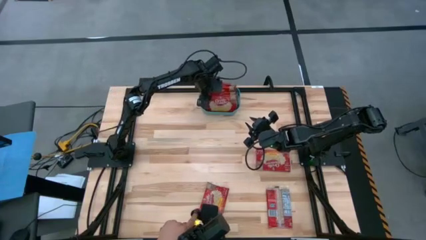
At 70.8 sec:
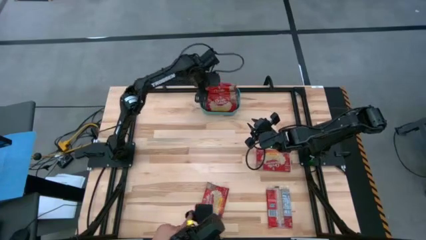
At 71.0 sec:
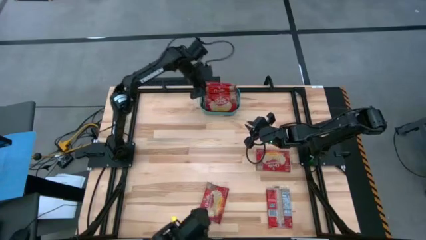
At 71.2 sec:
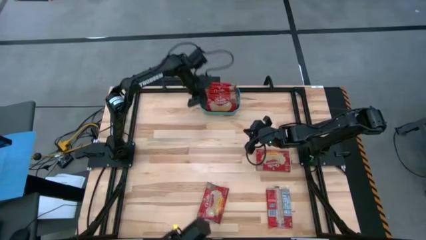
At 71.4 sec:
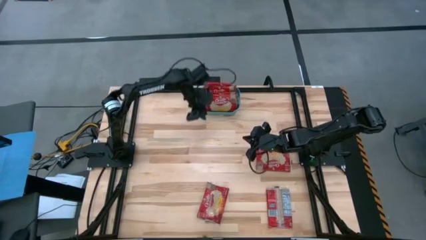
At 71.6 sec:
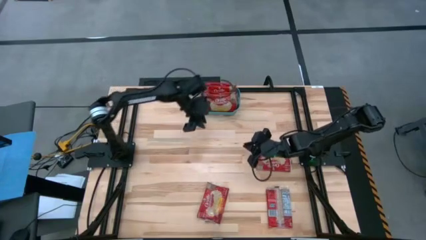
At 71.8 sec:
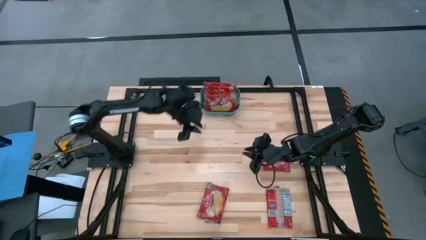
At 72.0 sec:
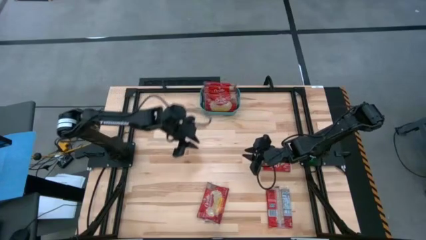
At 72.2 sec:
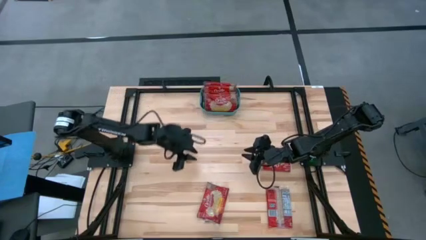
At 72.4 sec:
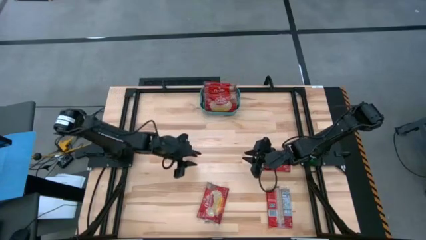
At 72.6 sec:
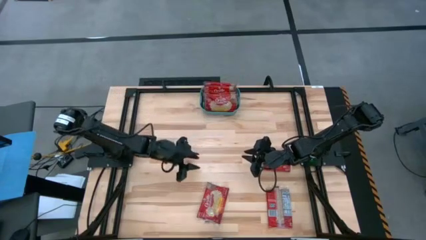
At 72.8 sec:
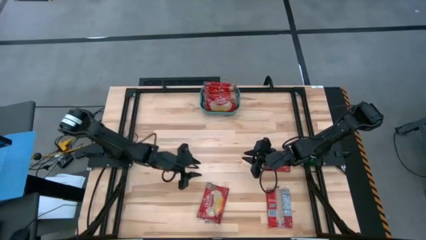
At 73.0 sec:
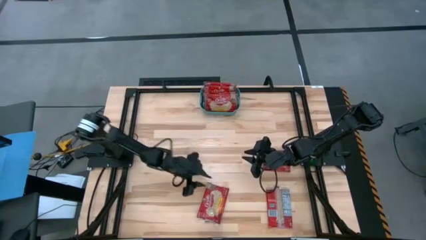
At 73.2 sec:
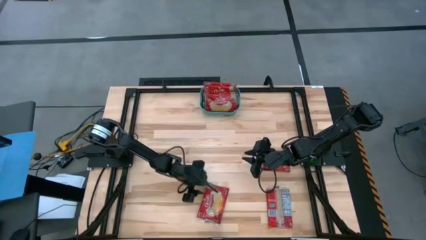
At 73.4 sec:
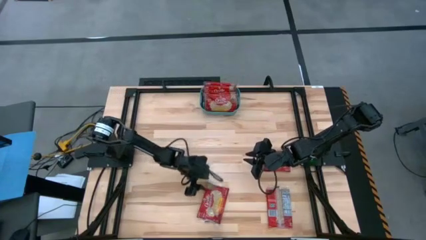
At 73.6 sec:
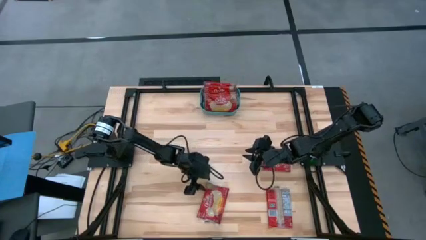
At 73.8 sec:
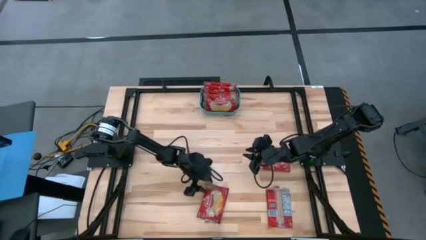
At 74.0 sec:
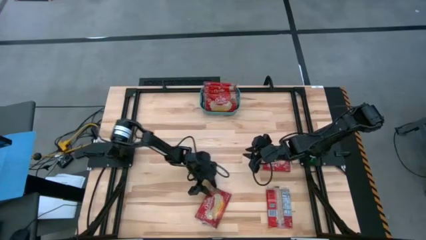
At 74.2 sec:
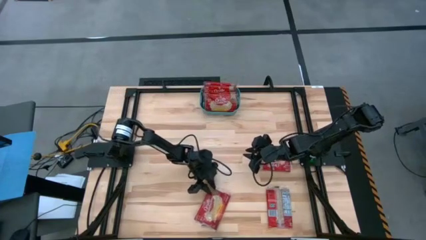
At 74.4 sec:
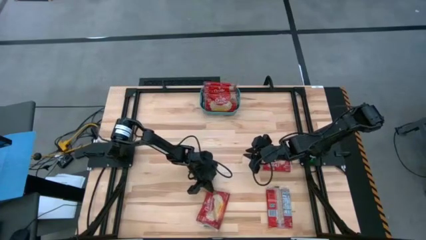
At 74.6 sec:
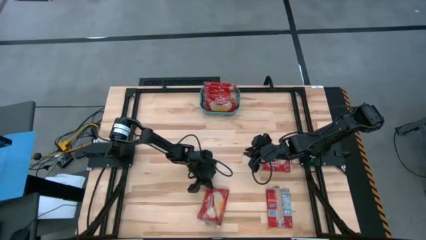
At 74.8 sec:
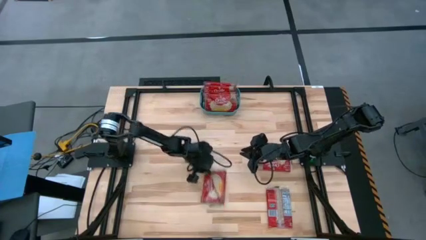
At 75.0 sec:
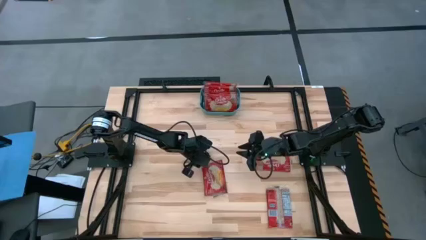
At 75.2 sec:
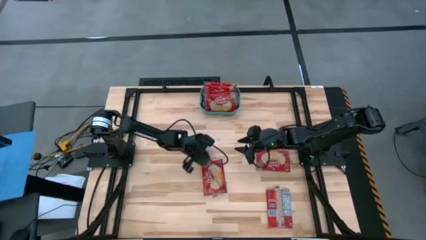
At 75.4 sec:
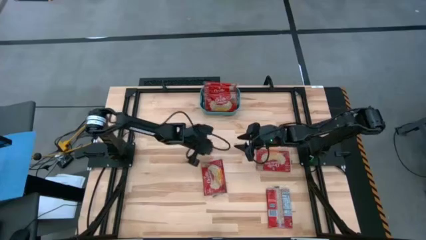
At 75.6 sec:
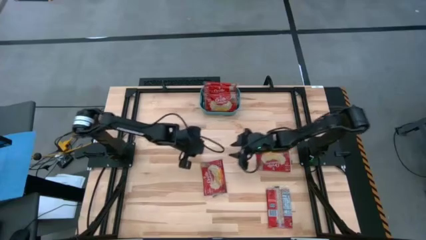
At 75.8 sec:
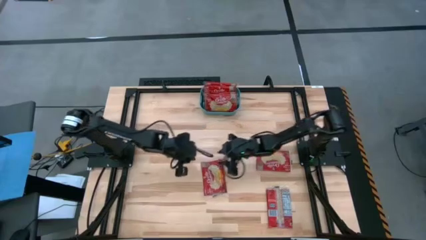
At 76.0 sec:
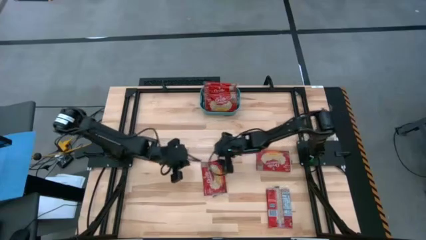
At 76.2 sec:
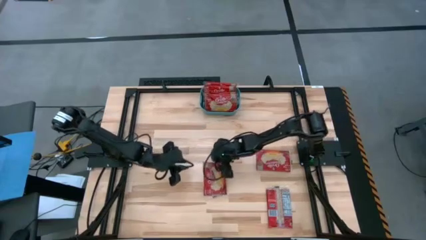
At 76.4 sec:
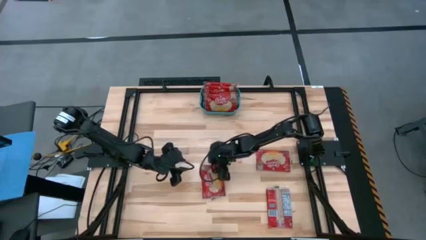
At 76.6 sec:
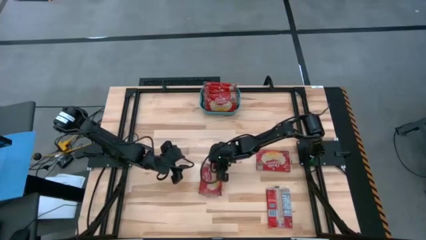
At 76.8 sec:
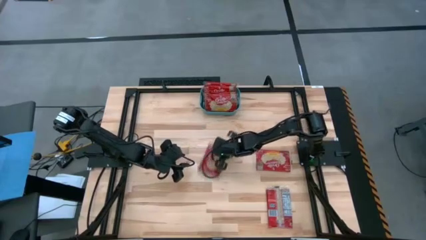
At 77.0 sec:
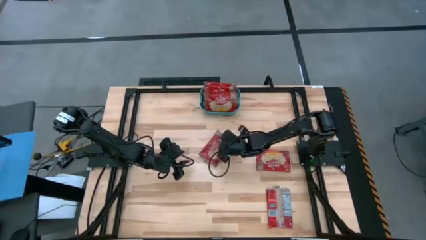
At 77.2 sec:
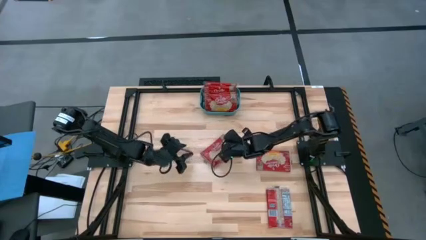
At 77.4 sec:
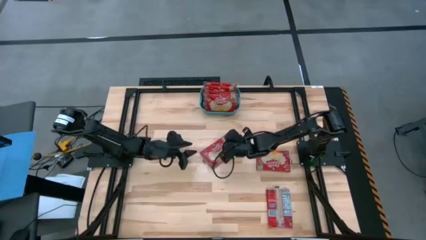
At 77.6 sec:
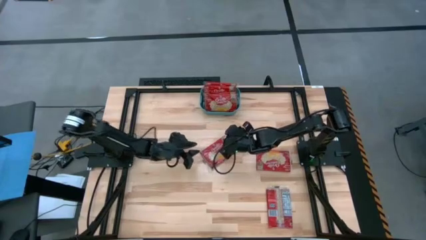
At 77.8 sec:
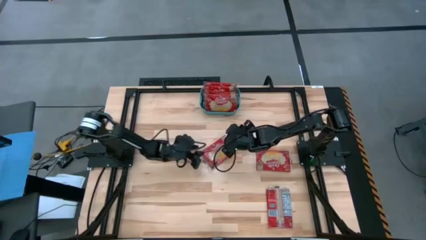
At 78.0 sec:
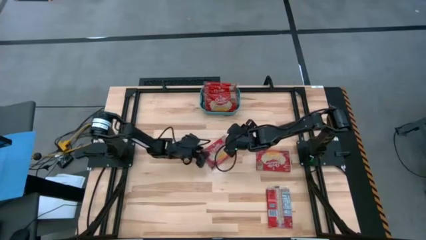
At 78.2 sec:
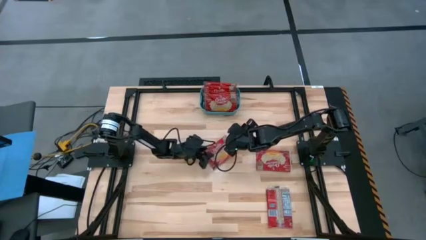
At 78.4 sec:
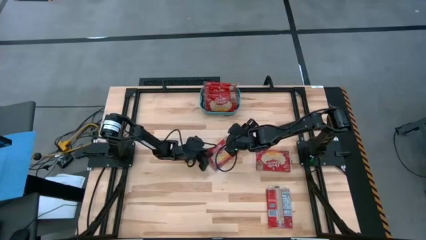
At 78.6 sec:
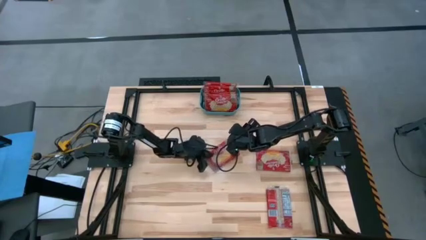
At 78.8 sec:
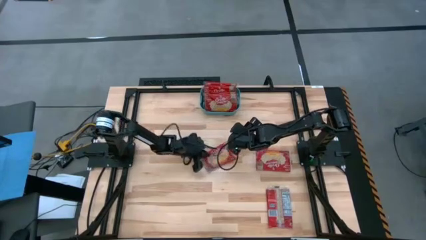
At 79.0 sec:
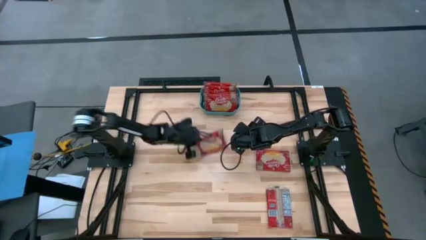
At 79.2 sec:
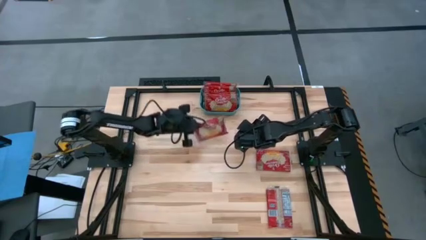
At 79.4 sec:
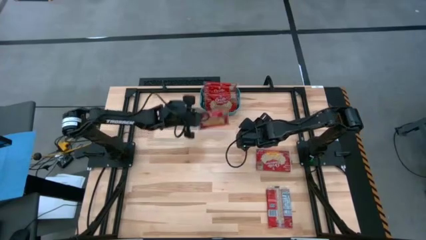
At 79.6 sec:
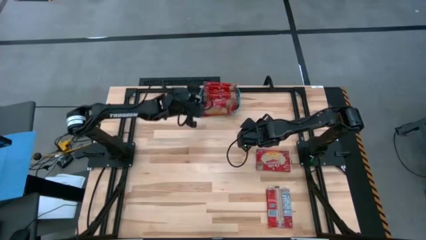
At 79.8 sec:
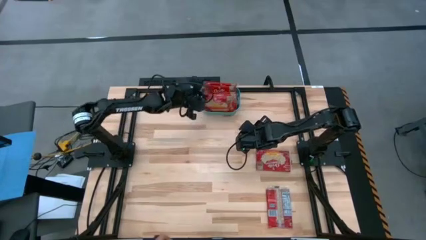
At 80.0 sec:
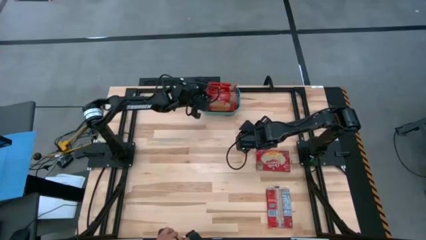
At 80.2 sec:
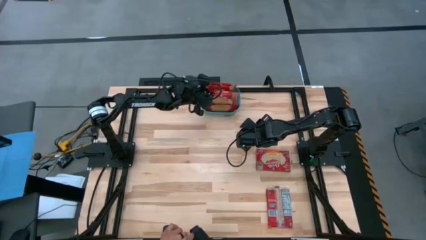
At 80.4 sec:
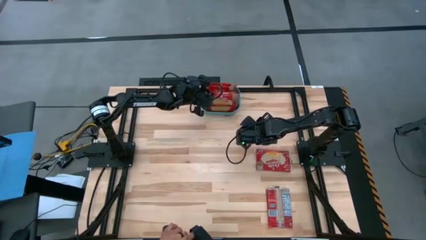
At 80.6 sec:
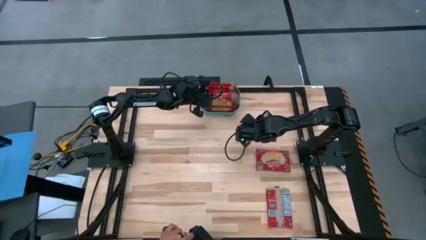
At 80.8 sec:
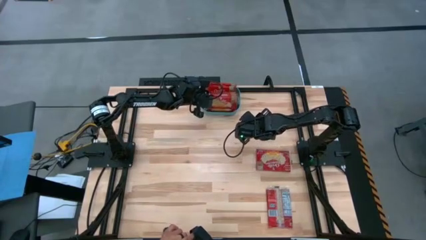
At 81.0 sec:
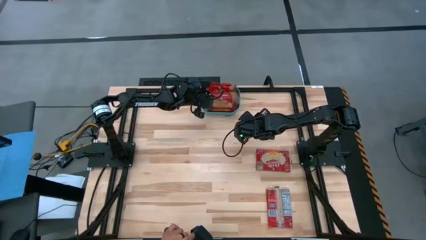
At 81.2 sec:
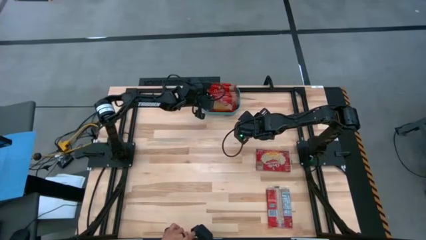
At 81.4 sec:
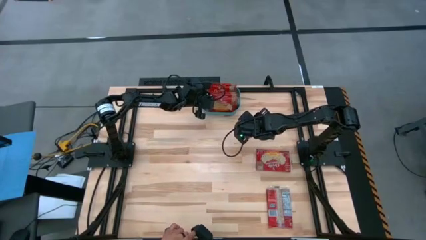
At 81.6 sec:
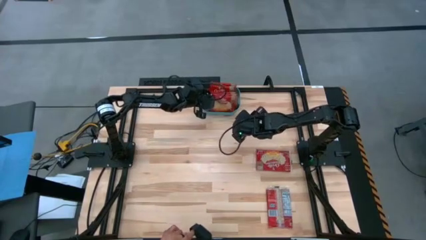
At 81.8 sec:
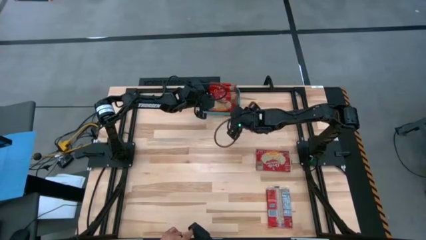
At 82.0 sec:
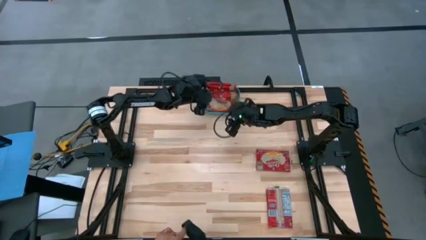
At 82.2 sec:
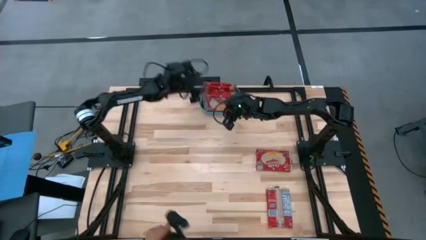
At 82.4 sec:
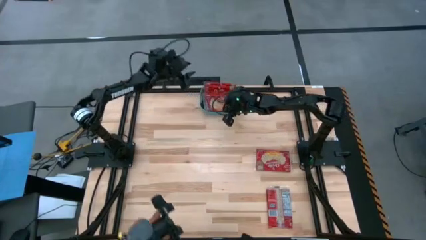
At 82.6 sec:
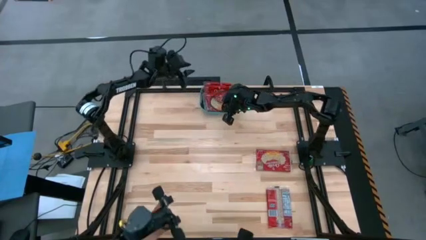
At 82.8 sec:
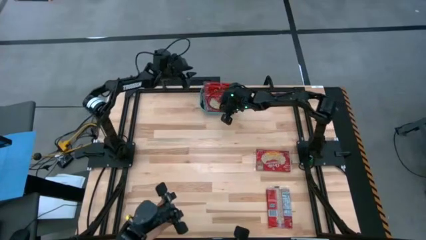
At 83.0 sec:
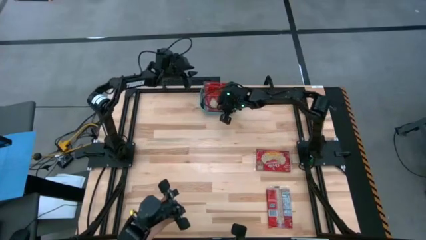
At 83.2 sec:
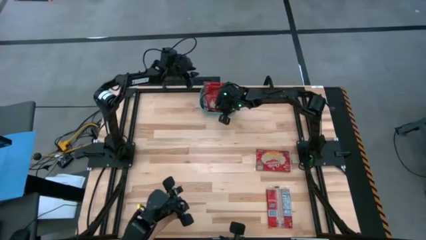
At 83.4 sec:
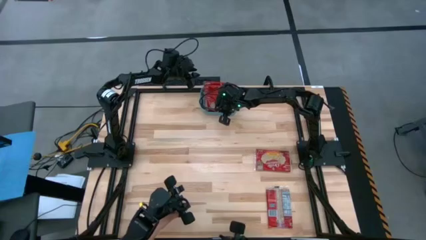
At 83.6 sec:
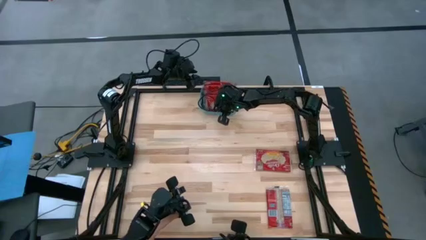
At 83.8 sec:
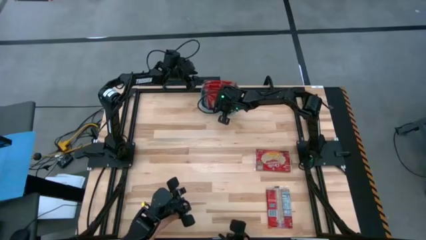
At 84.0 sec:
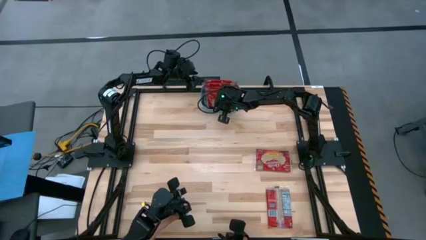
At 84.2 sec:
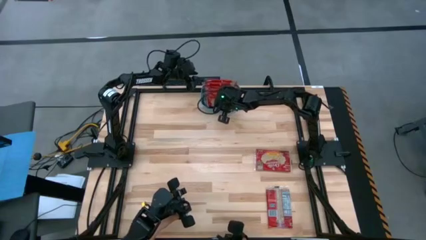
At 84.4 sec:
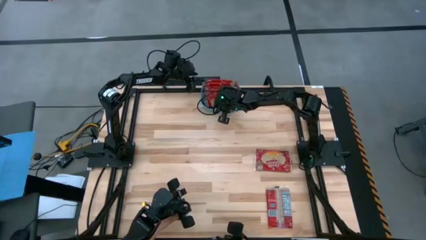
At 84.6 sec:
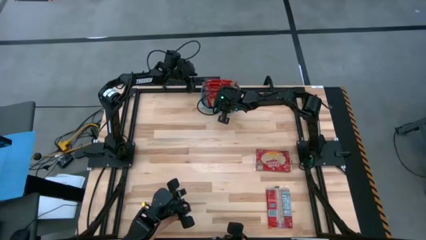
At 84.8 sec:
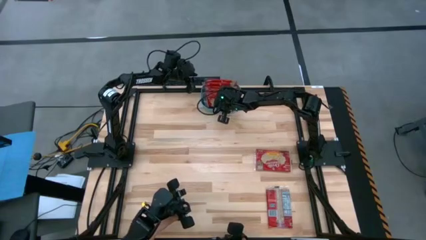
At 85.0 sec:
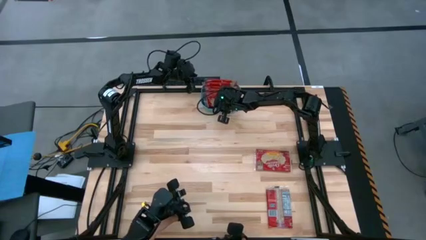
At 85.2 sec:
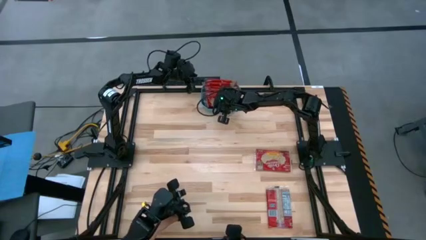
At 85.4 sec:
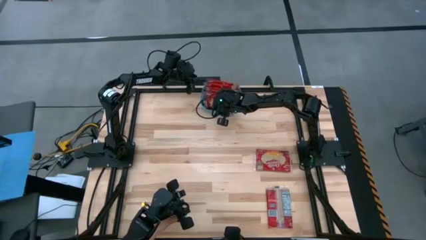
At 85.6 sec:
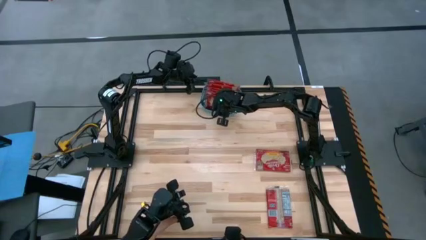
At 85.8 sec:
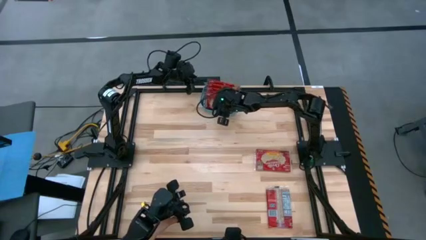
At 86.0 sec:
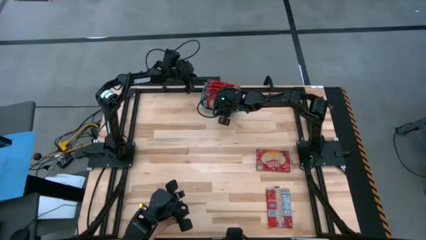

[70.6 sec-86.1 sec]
Task: Sort popcorn bags into baskets
Put the red popcorn bag into the blue bin
